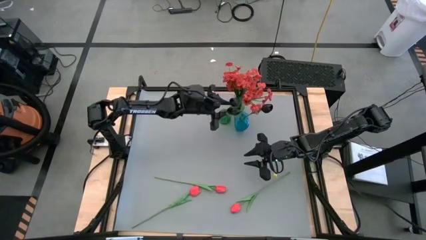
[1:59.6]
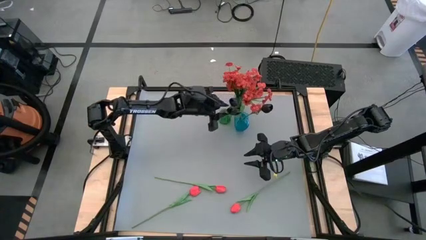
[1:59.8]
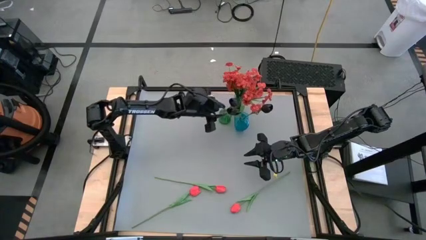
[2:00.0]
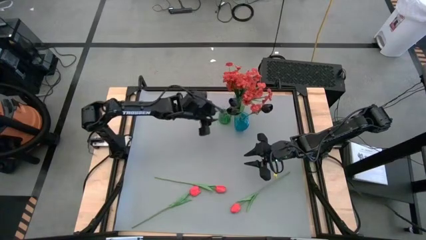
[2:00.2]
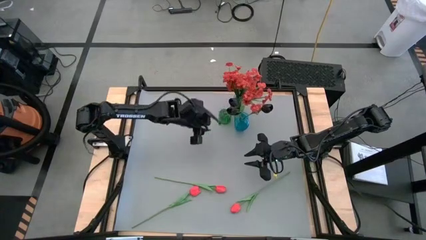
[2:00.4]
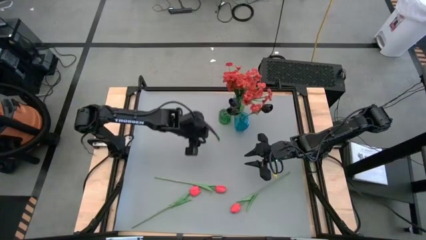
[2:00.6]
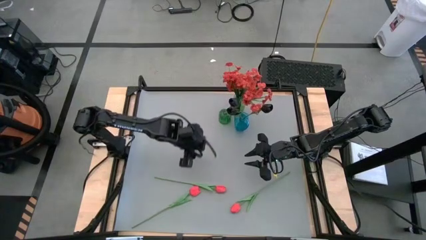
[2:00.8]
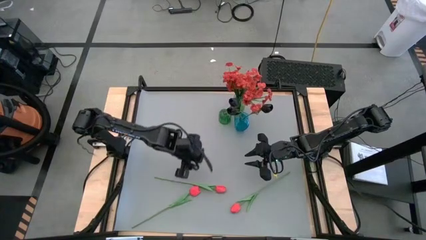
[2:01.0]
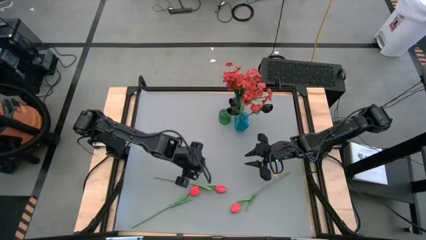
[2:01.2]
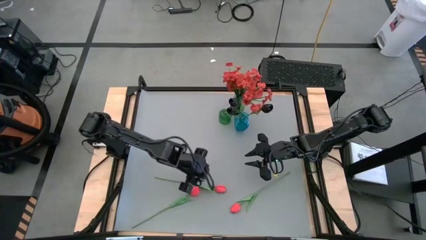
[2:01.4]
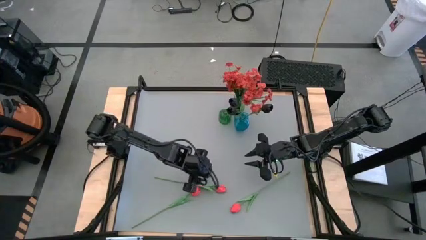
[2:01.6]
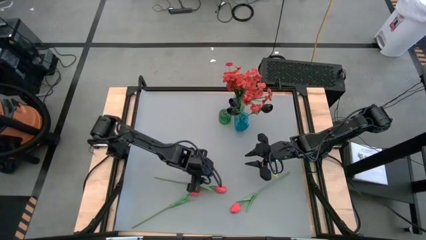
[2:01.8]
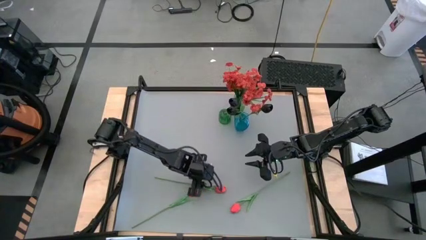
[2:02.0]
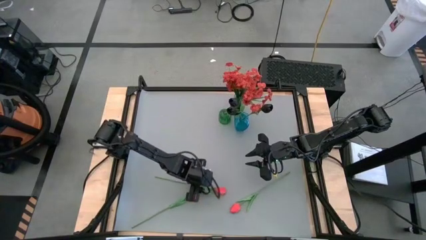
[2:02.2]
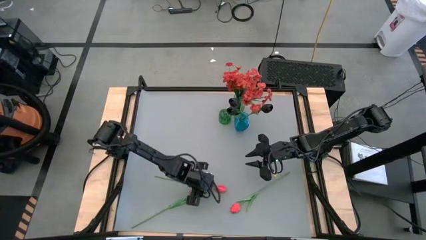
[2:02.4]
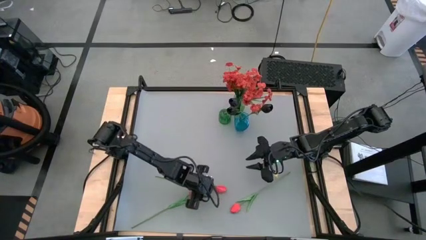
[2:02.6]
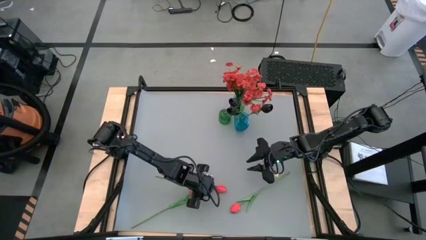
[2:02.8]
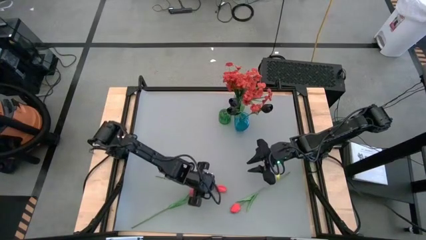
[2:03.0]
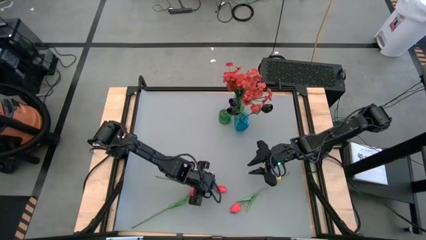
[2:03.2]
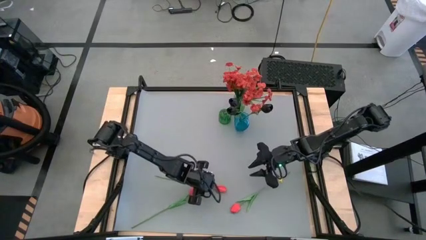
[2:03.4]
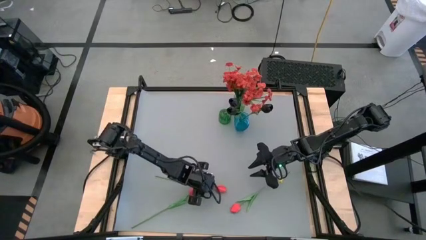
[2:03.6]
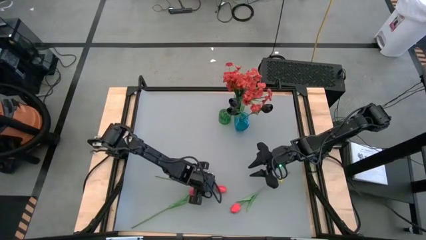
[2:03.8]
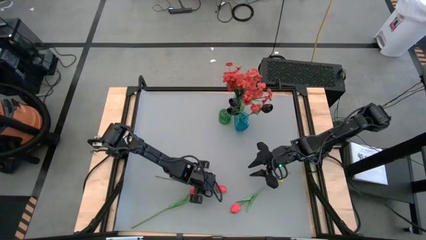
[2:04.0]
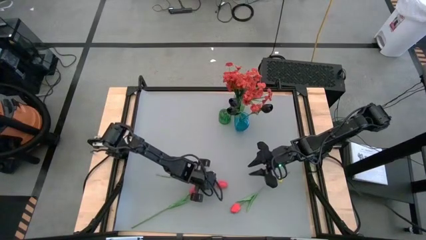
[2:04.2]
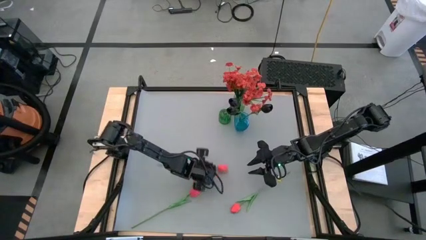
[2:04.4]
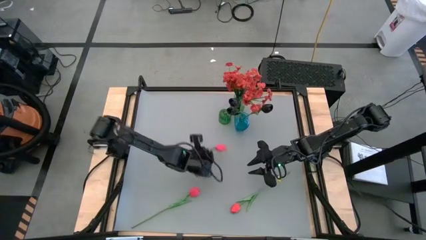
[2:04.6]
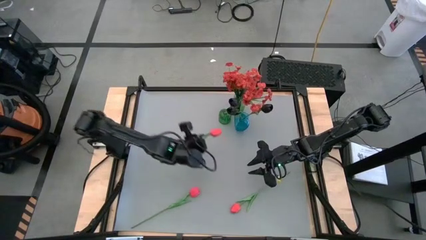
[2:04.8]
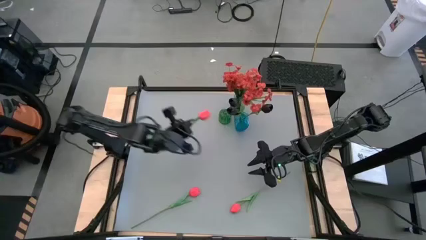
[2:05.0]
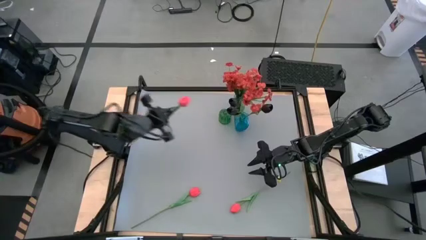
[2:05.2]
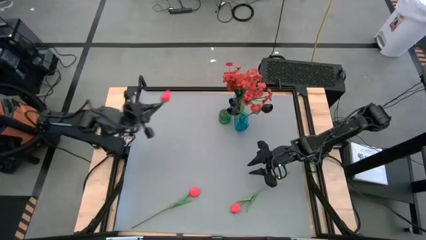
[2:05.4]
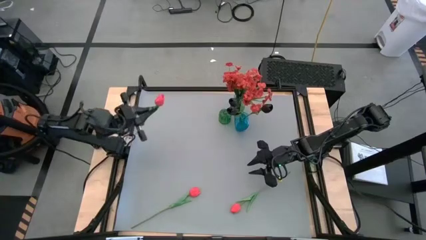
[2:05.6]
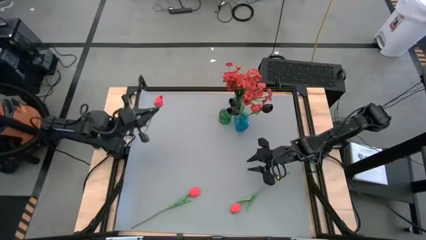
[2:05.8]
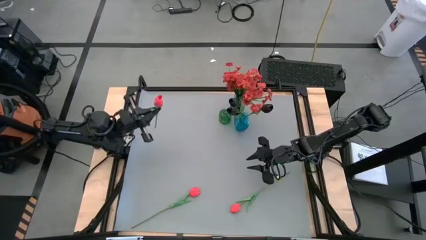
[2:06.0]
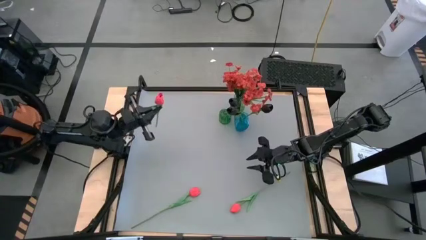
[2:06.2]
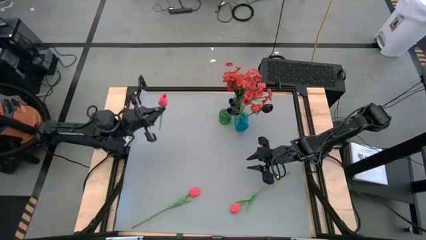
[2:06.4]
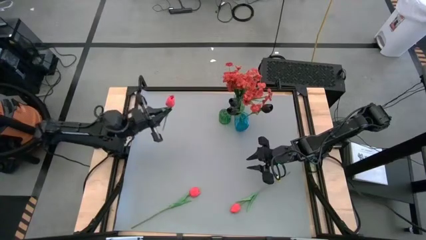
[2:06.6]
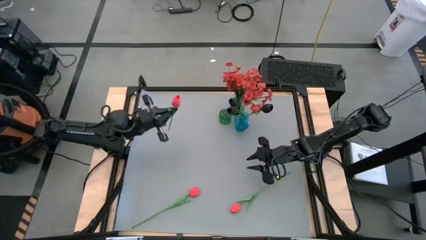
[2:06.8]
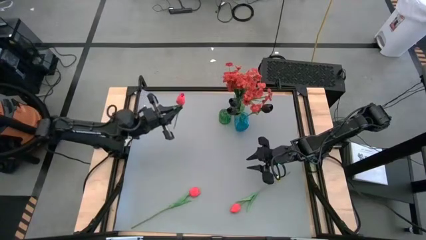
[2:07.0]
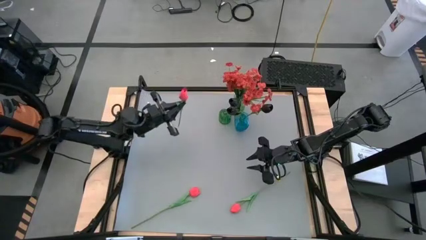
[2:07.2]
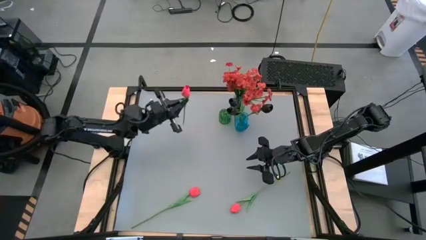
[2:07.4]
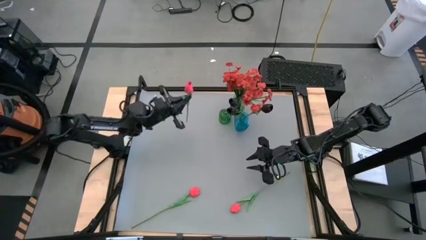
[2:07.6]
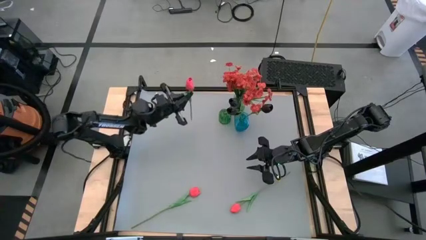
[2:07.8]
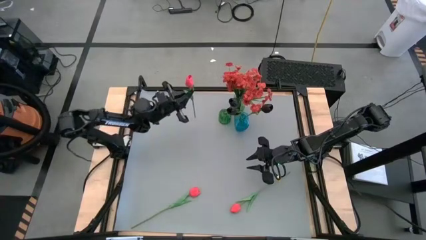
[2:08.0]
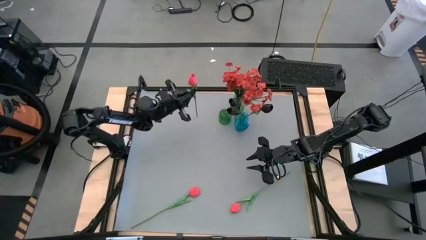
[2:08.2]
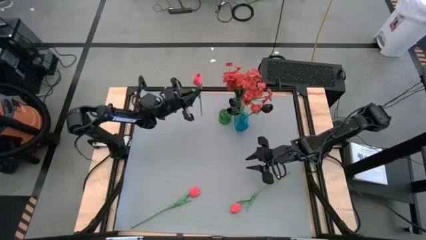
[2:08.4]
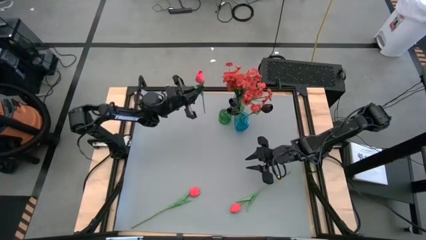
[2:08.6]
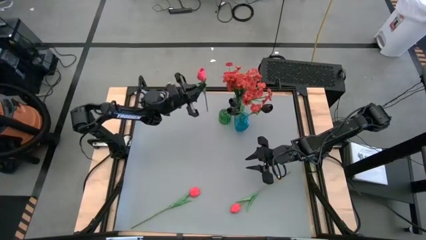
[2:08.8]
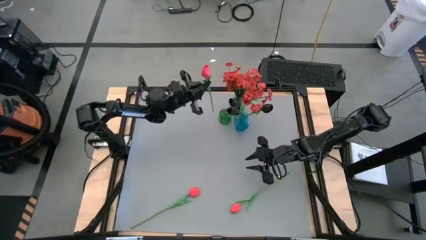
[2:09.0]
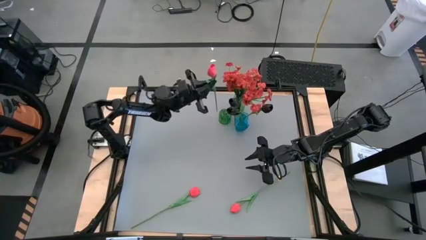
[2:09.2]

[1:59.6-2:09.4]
Task: Sort flowers into vase by color
Put the top pink flower into the bottom green vase

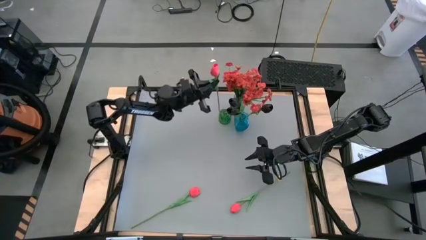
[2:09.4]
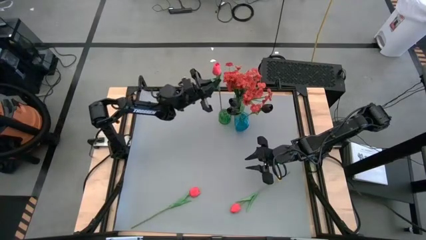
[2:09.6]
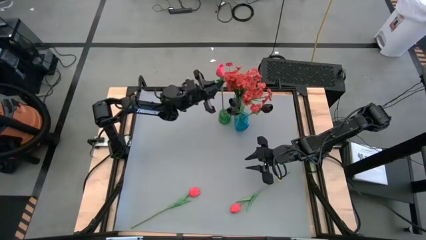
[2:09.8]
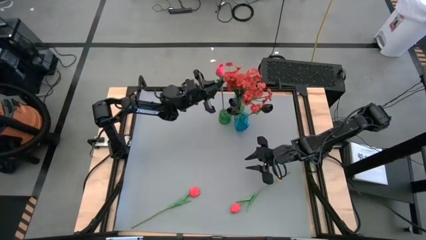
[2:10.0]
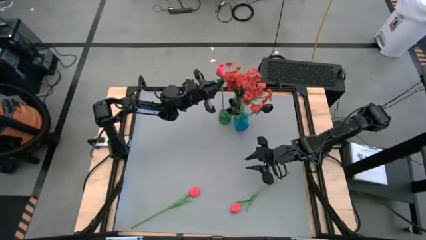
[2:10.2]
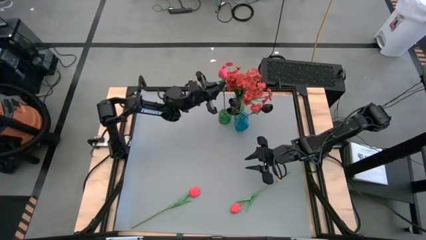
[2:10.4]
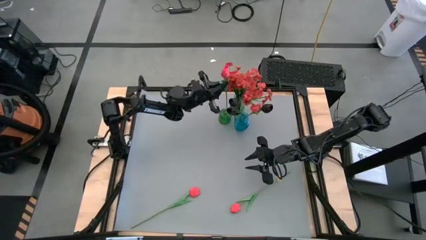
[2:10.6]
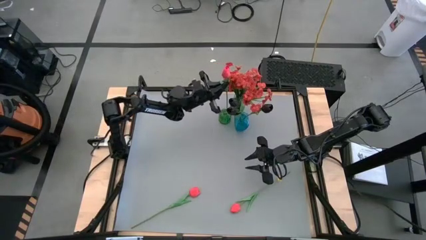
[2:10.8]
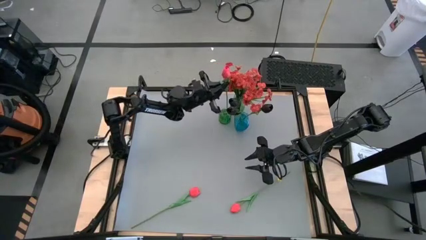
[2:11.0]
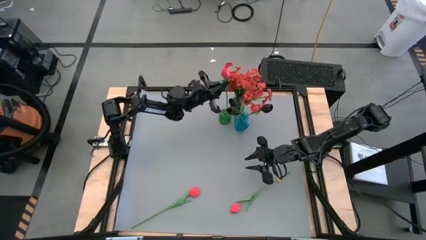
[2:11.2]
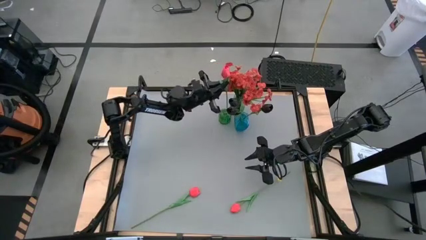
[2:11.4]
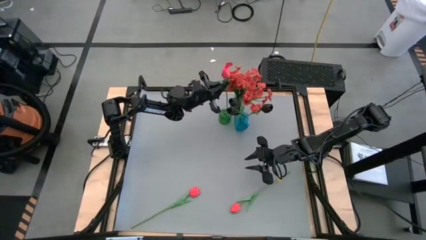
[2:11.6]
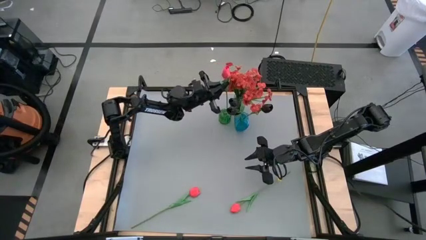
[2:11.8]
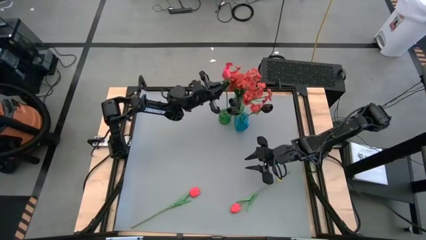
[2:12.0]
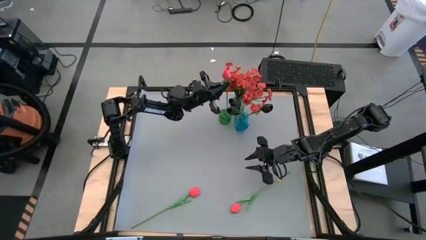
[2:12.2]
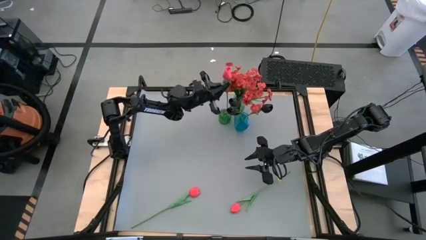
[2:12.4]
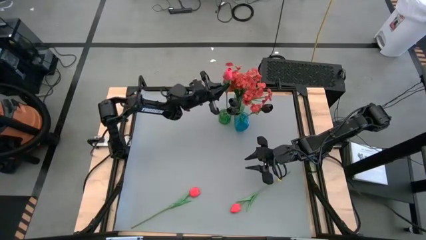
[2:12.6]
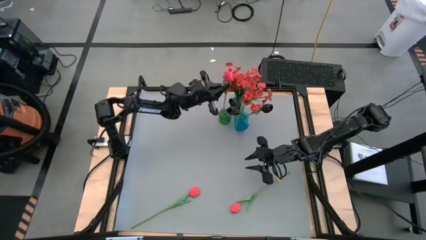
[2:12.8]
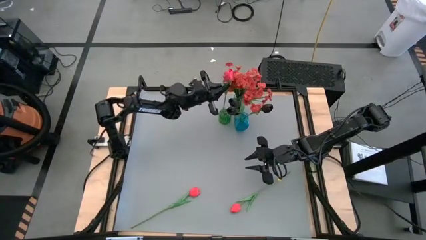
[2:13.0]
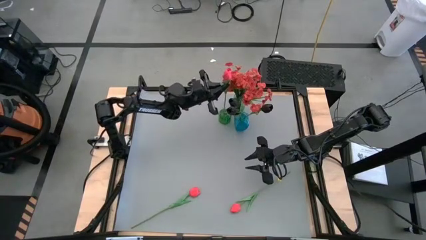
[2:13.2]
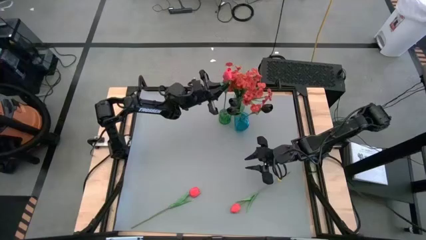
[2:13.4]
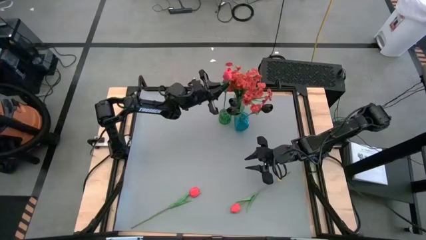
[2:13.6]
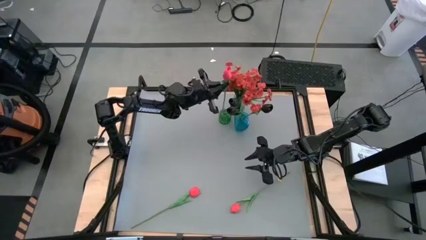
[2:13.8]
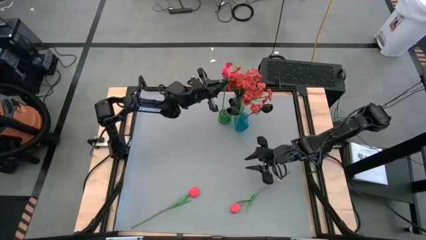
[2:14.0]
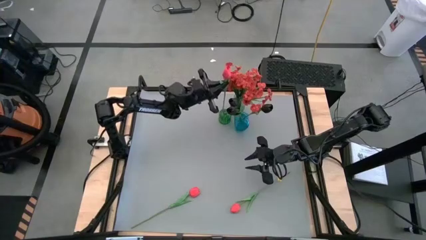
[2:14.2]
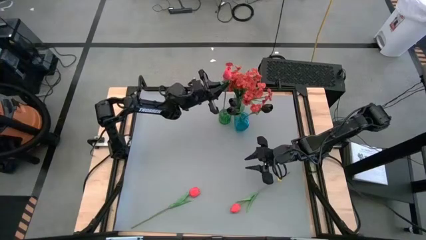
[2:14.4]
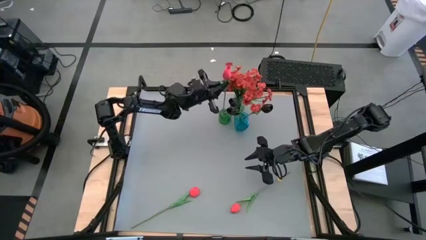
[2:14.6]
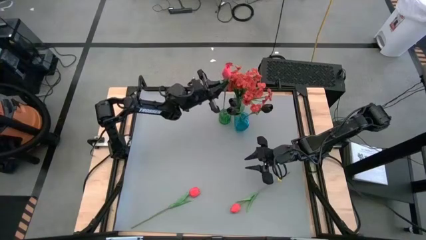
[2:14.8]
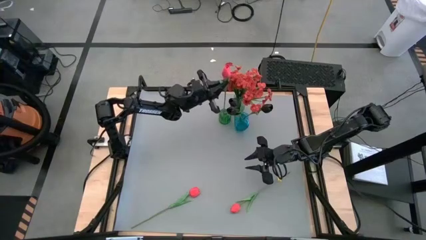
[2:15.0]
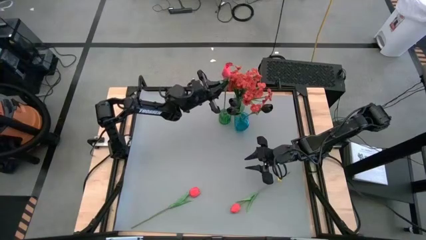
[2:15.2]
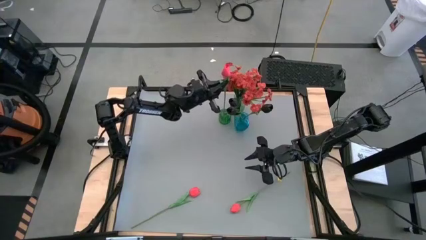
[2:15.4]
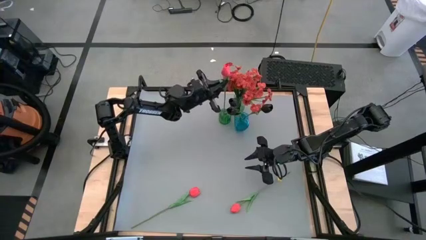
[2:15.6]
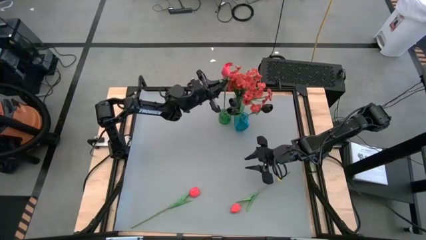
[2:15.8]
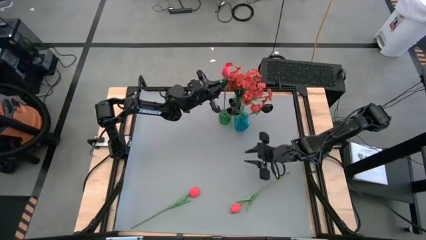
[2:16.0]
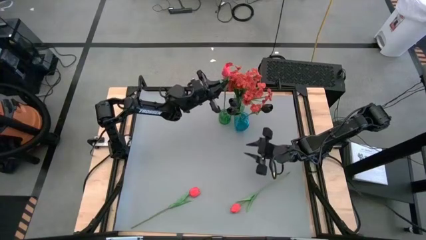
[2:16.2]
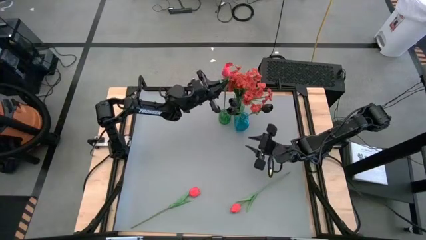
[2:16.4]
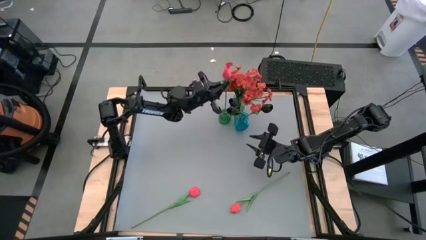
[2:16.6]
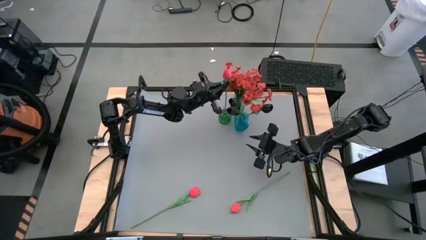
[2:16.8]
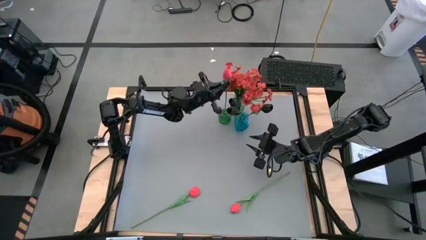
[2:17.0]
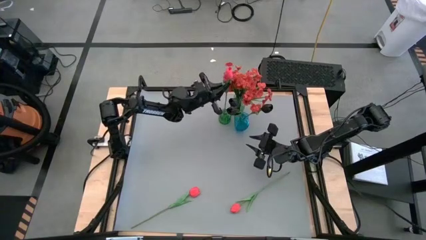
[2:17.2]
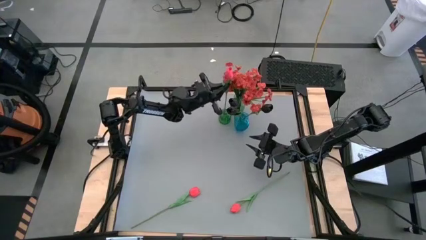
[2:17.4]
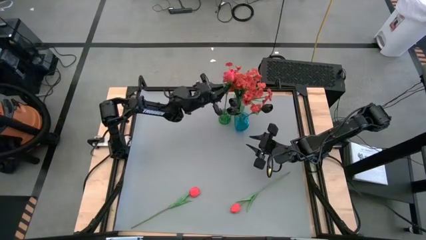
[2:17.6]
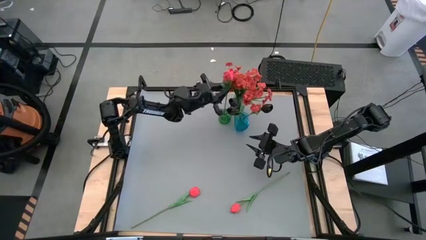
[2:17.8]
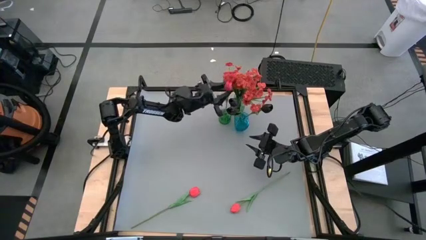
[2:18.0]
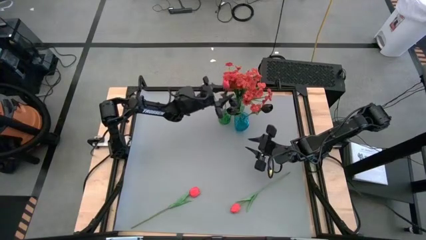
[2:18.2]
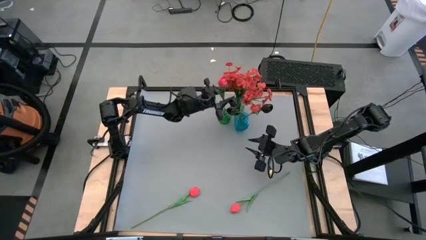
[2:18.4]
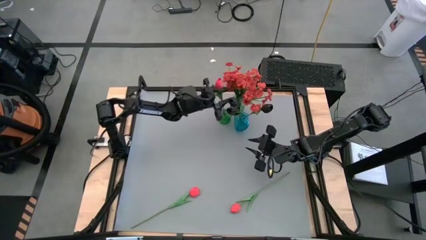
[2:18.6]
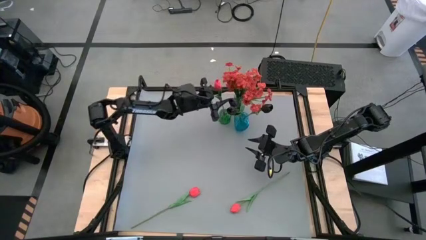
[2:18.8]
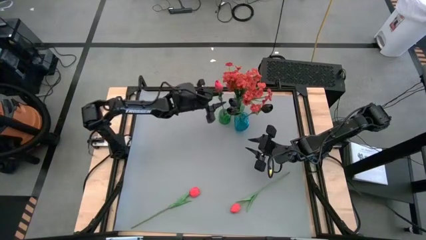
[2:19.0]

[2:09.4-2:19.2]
Put the top pink flower into the bottom green vase
